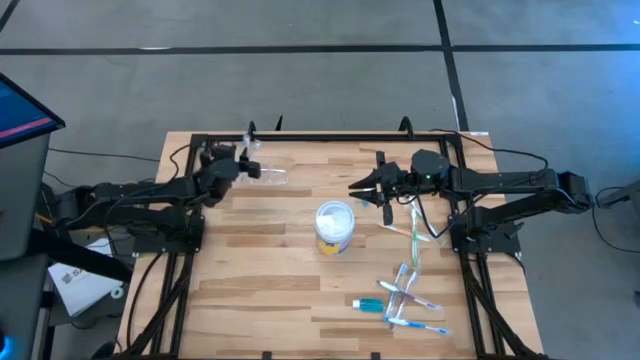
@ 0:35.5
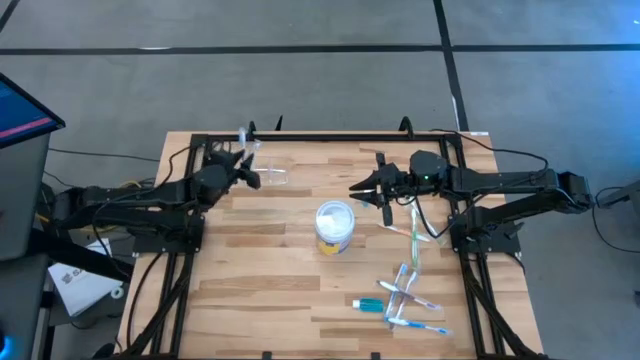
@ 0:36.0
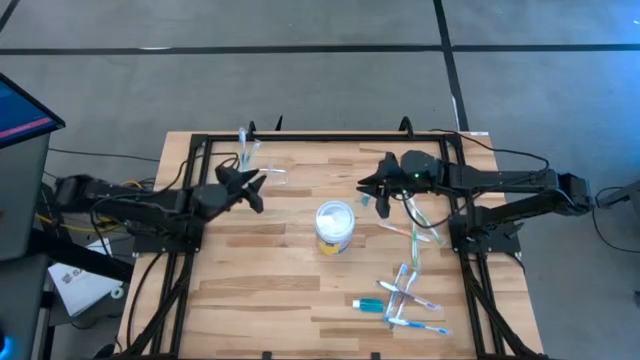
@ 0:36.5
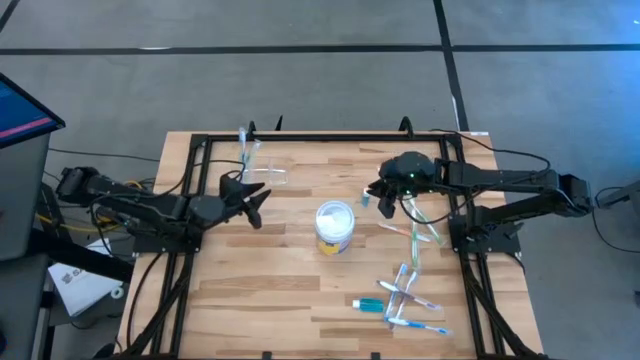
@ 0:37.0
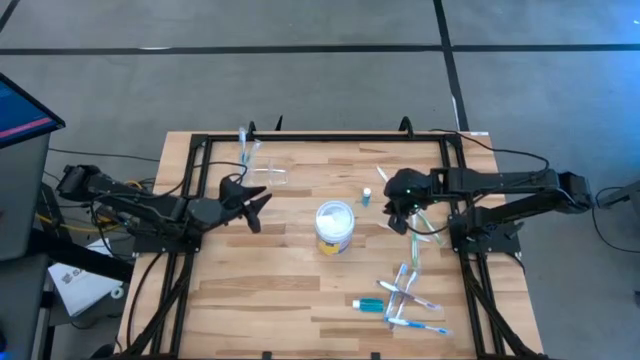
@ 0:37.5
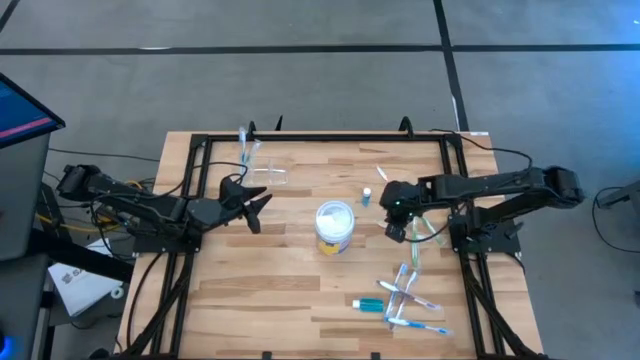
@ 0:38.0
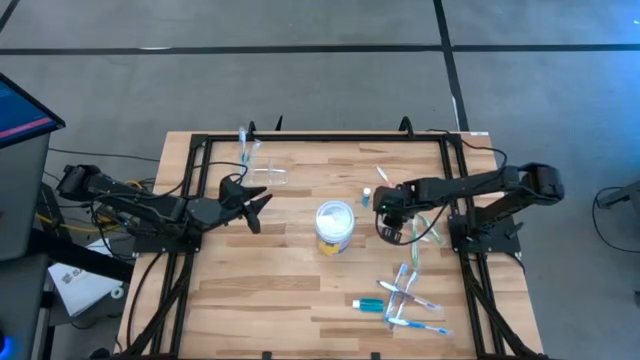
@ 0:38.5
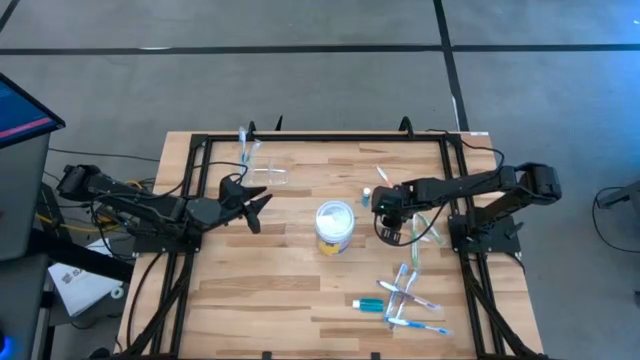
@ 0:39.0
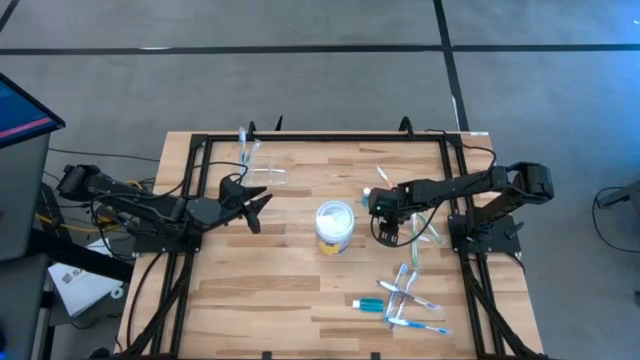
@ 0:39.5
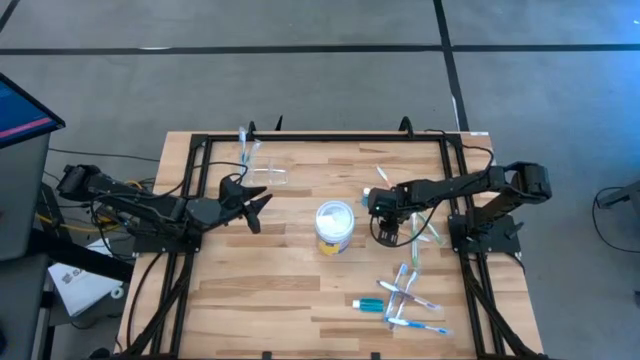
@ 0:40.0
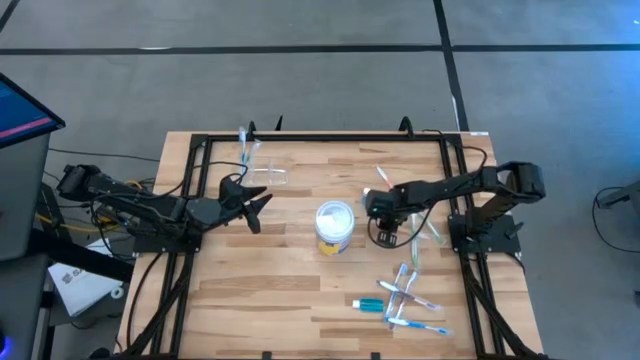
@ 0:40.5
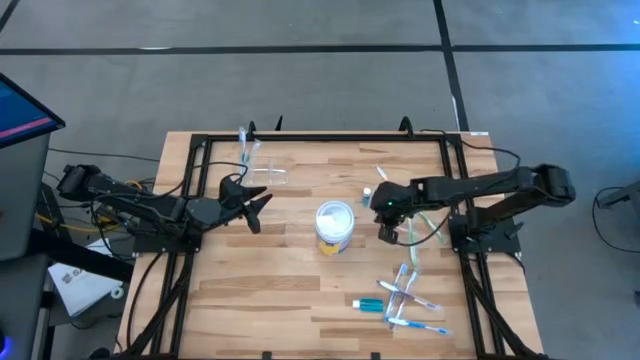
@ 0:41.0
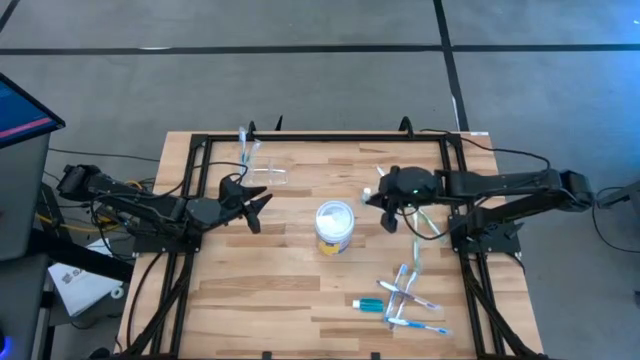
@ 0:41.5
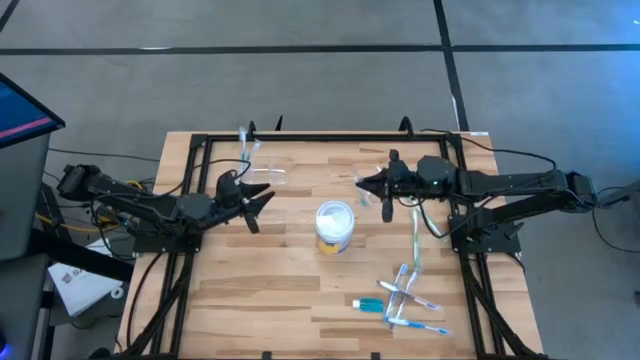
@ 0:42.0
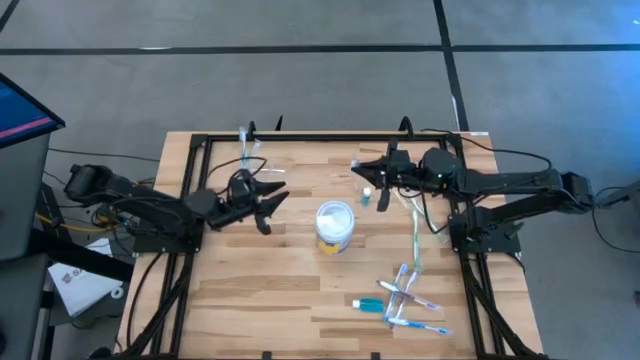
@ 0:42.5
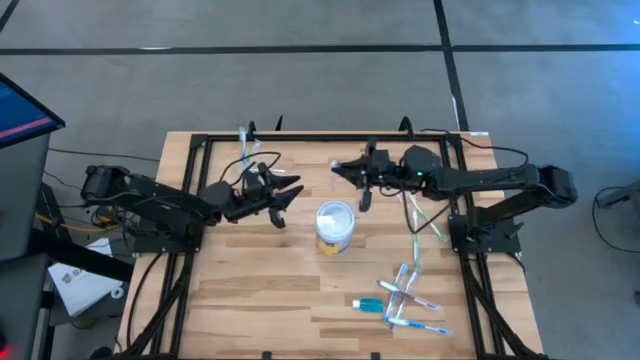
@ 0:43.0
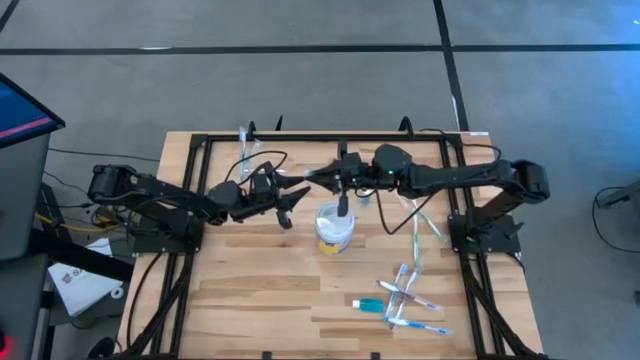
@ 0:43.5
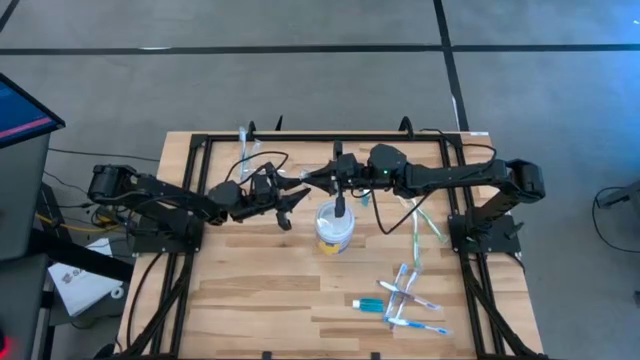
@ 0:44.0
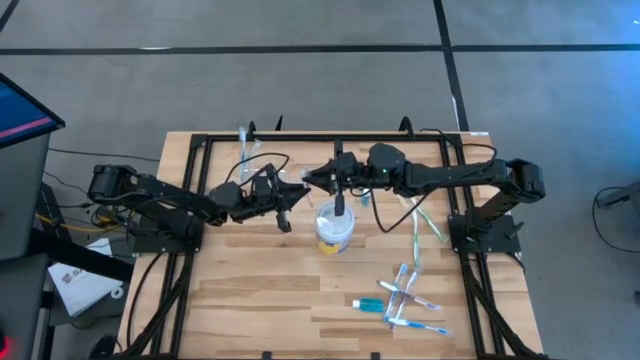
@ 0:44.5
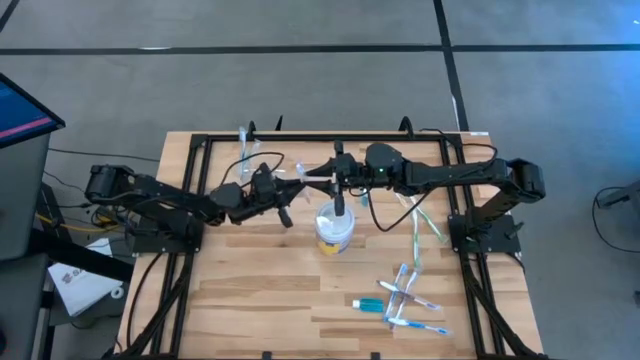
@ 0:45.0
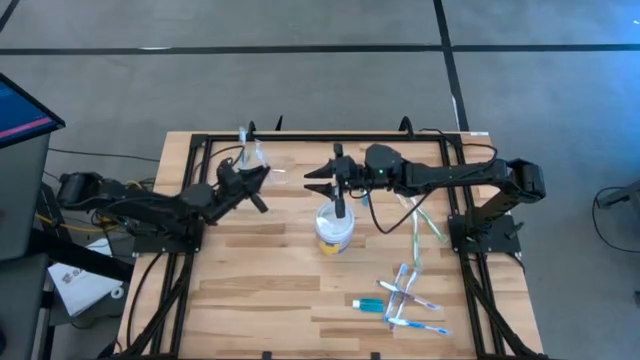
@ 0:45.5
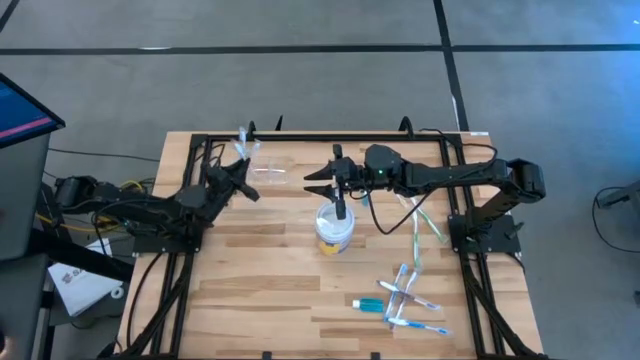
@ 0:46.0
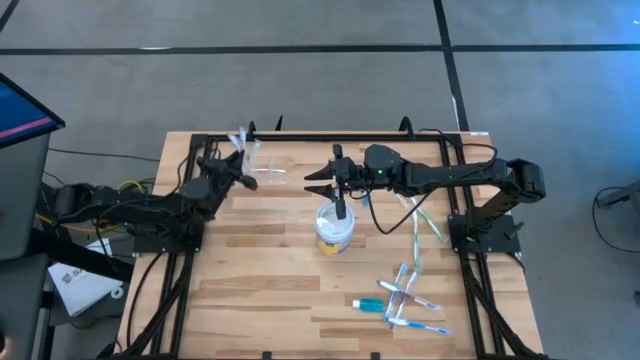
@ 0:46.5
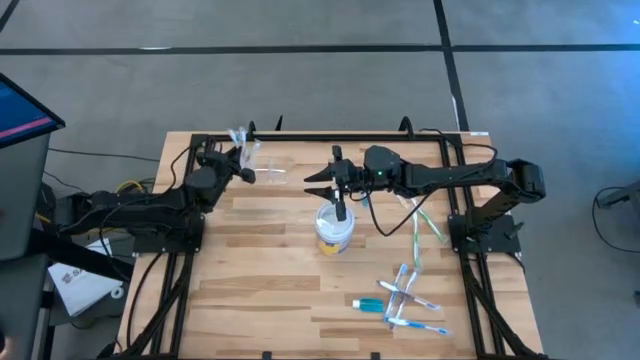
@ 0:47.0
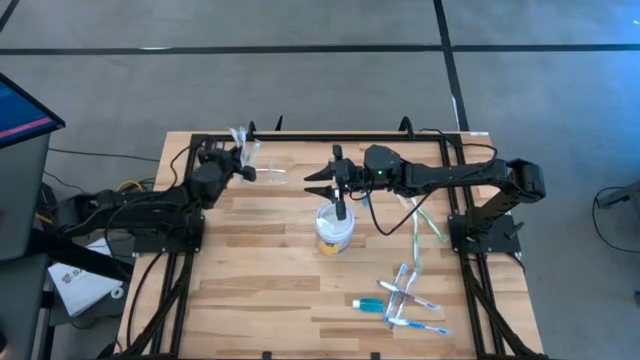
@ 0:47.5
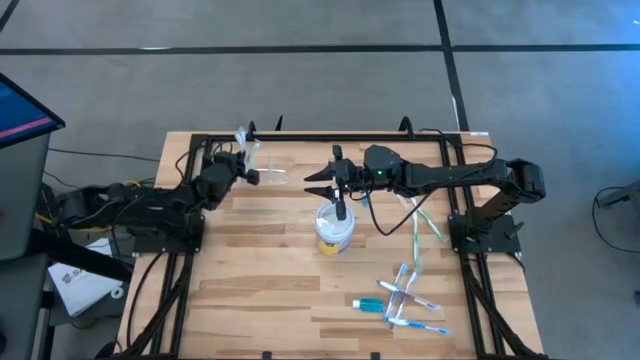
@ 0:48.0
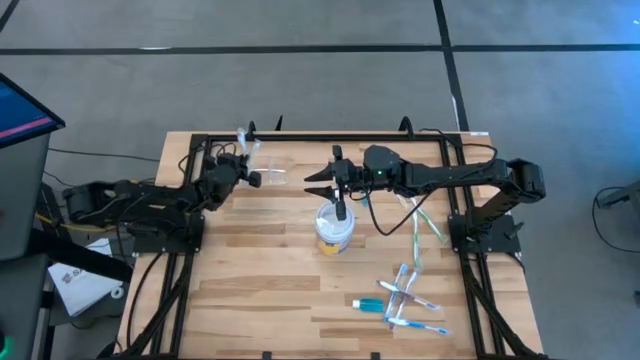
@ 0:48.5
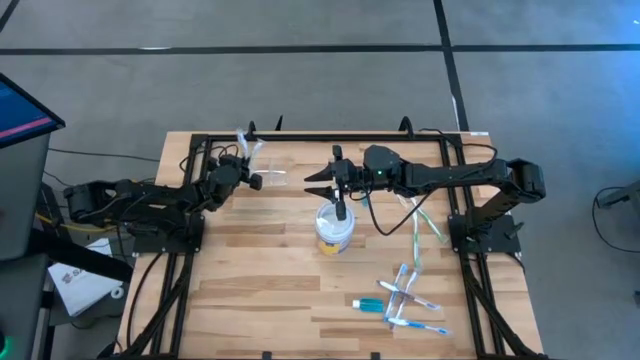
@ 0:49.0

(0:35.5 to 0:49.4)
Task: Pick & Place toothbrushing station
Put the bottom orange toothbrush into the transparent organizer

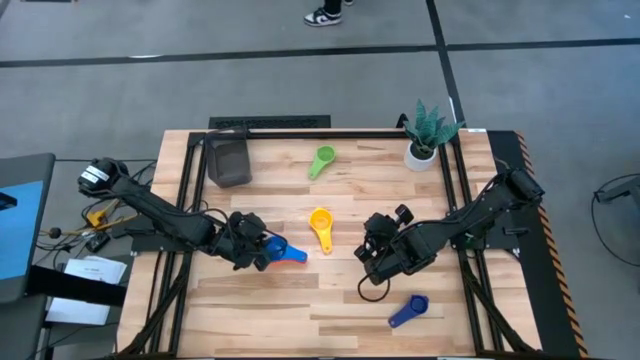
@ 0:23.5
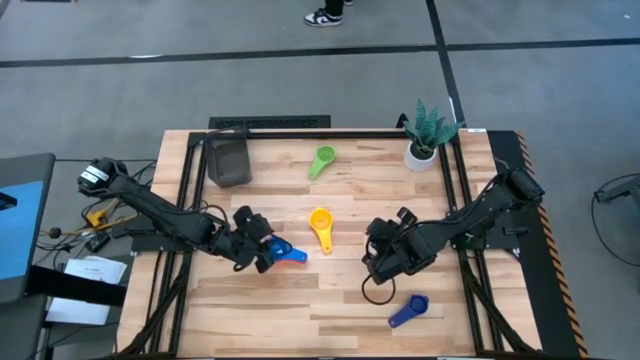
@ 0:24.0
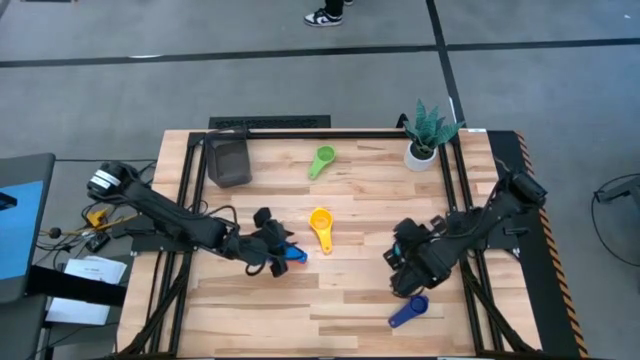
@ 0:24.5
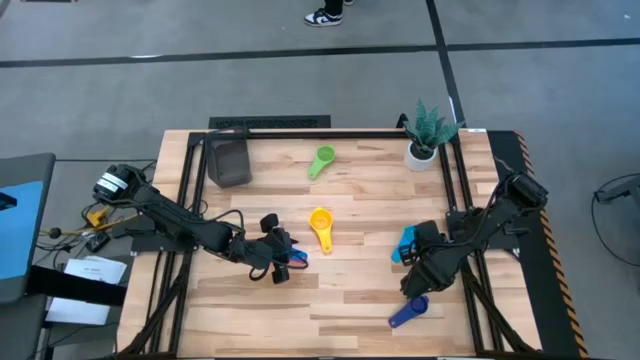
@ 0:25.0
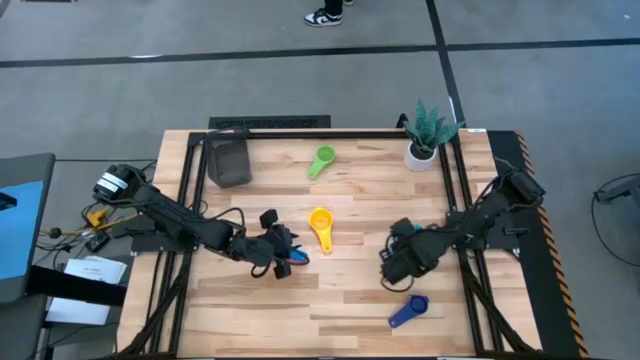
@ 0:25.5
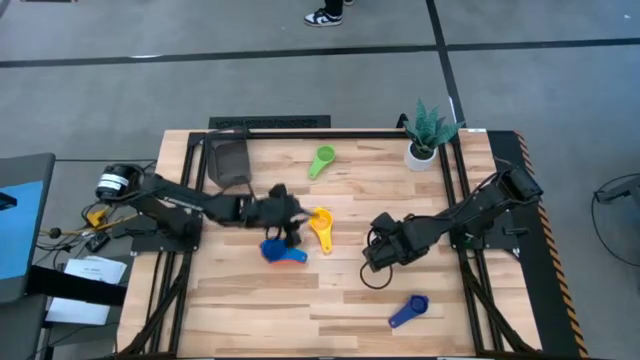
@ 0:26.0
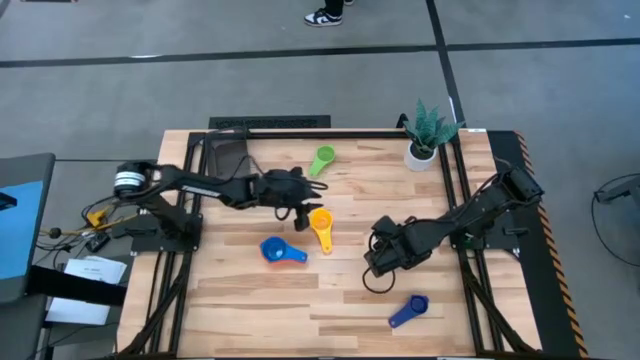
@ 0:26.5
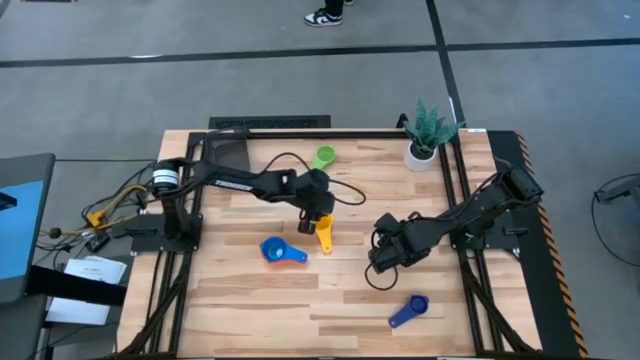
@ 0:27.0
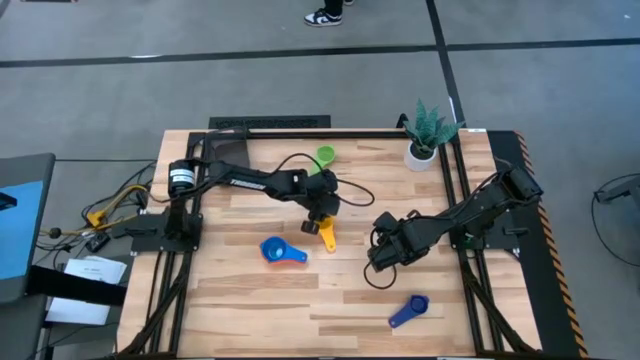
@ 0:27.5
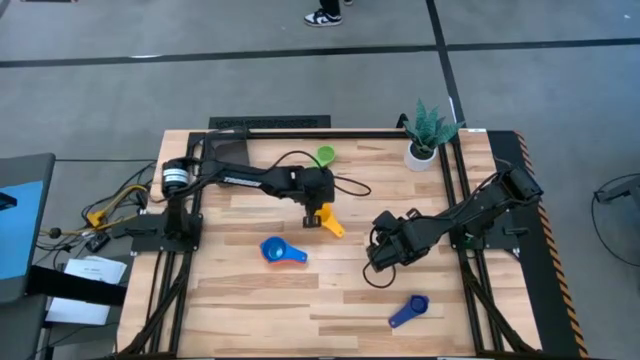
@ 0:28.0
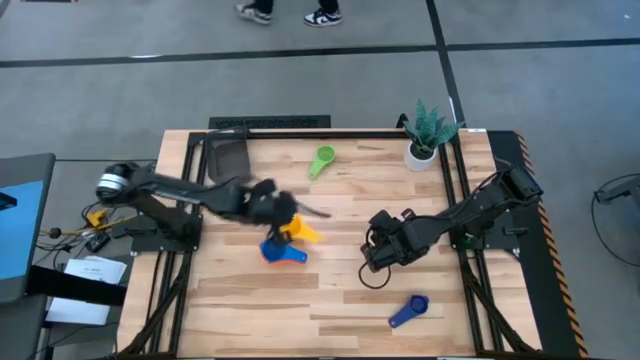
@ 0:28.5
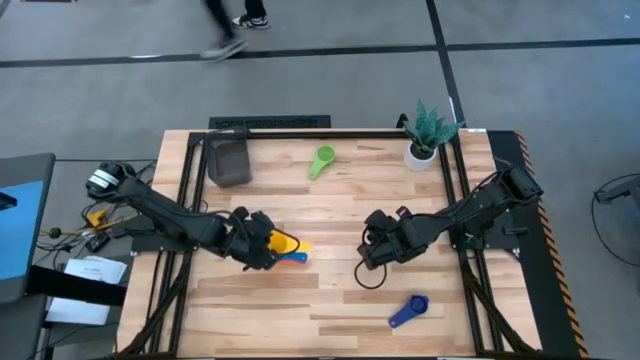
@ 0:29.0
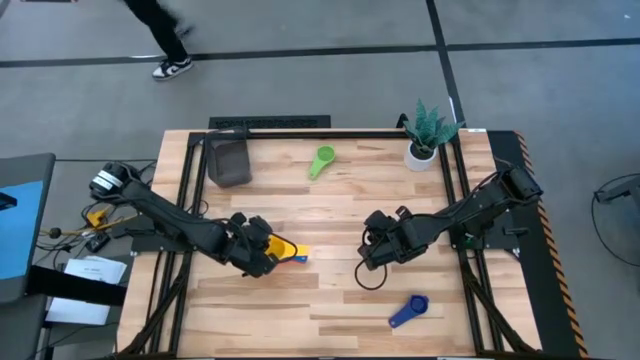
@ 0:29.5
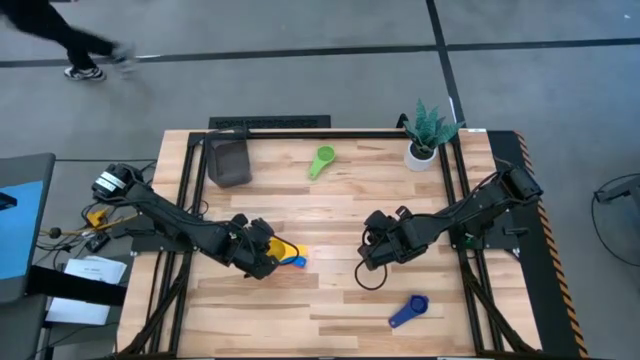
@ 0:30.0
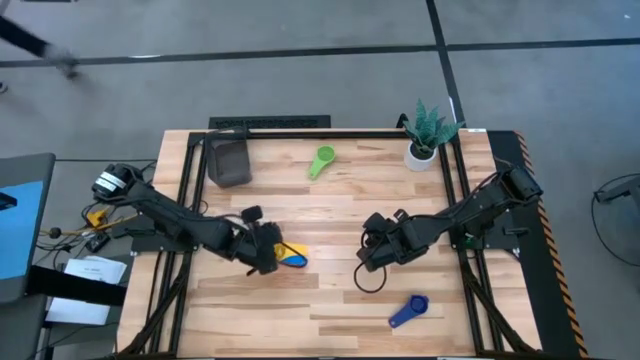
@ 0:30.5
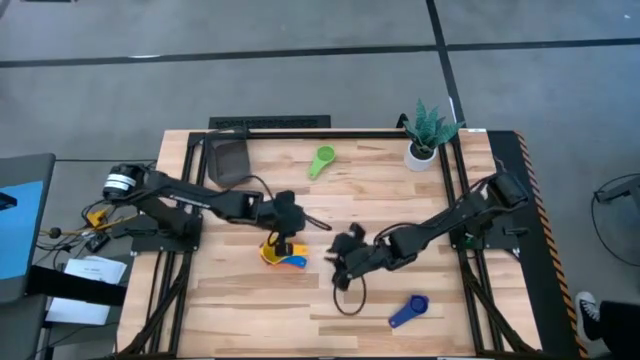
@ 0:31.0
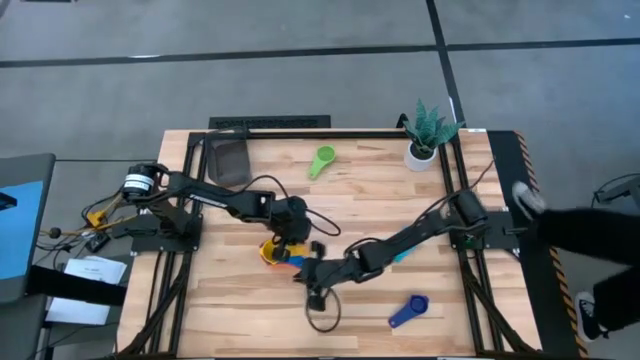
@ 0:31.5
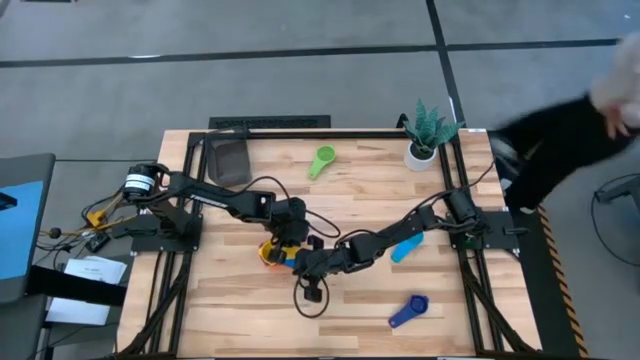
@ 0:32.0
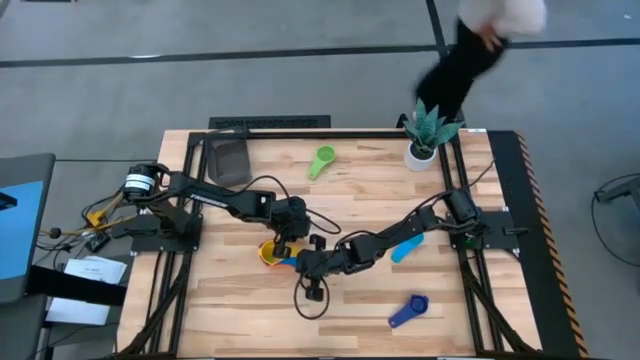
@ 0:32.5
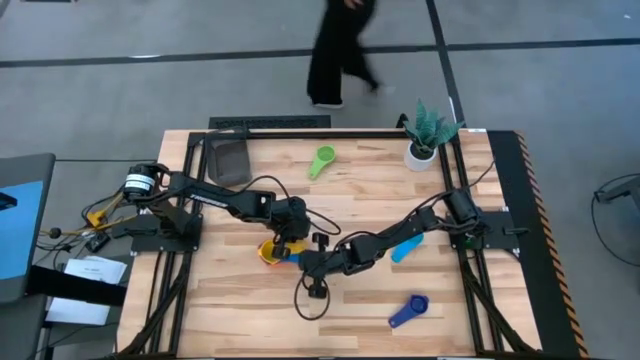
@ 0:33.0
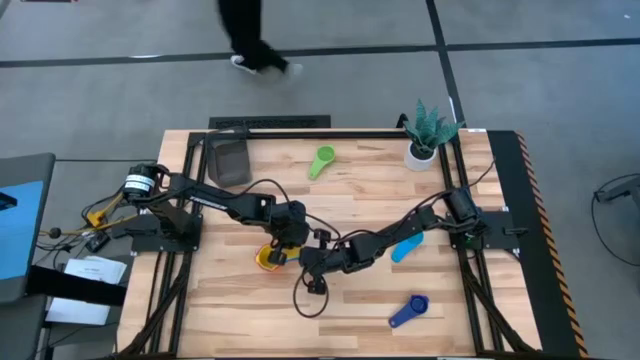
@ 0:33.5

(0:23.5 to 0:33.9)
Task: Nest measuring cups in basket
Stack the yellow measuring cup on top of the blue measuring cup
